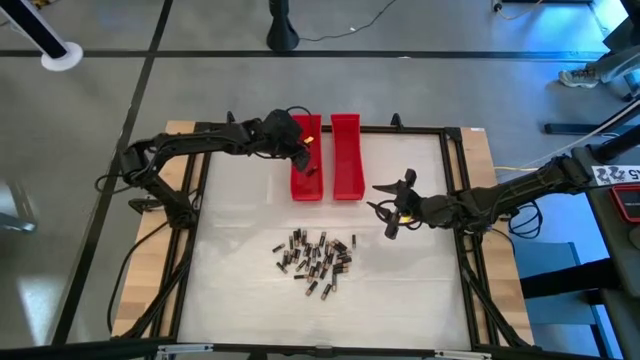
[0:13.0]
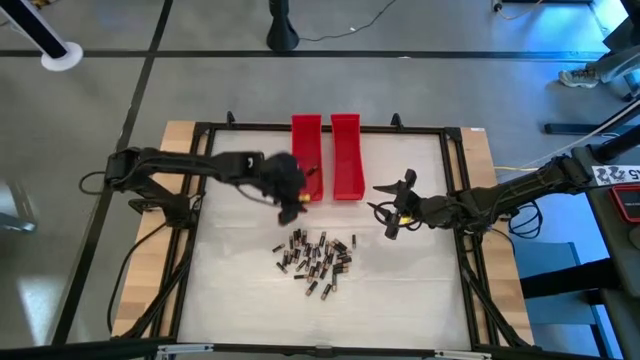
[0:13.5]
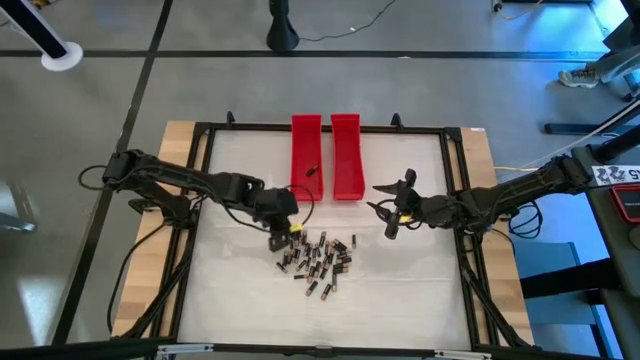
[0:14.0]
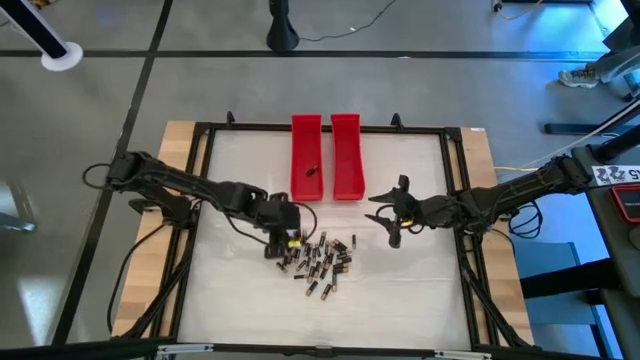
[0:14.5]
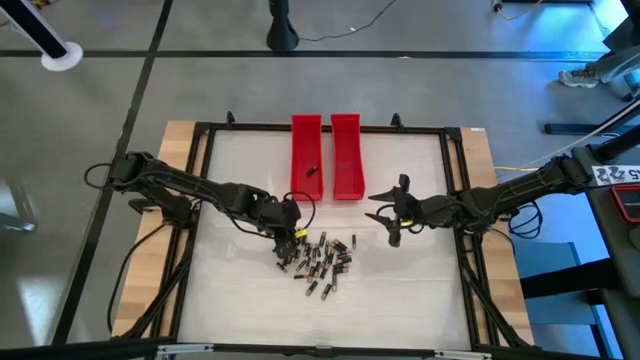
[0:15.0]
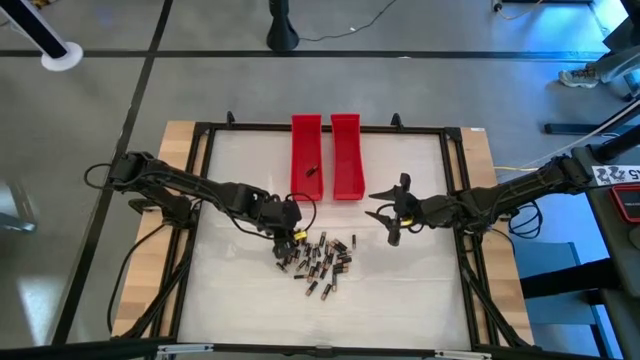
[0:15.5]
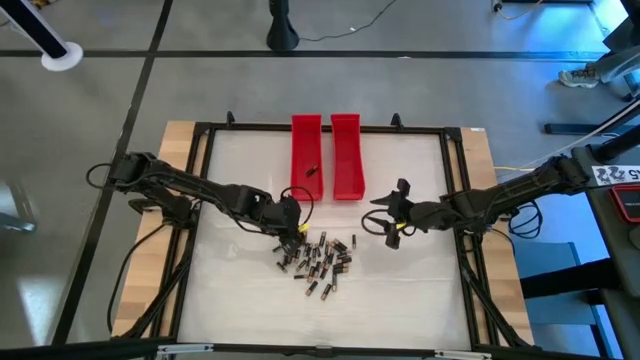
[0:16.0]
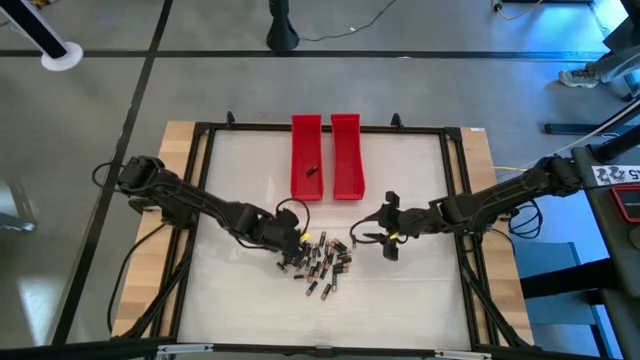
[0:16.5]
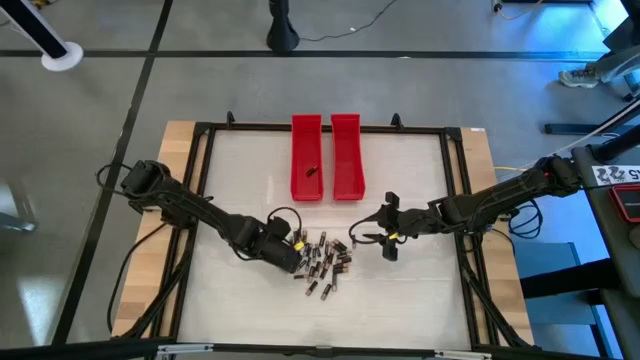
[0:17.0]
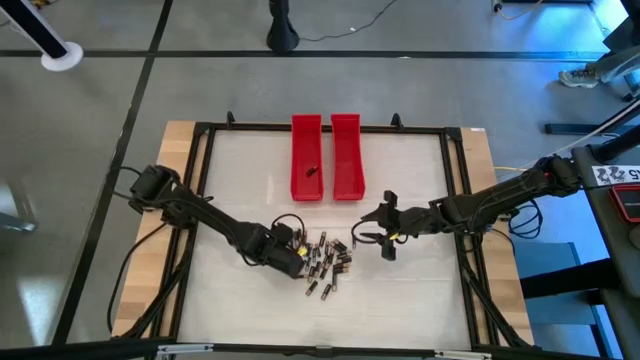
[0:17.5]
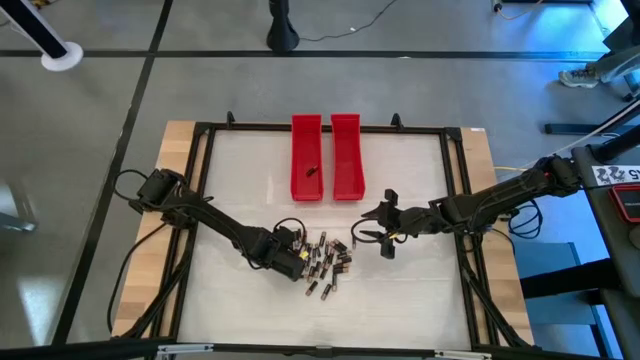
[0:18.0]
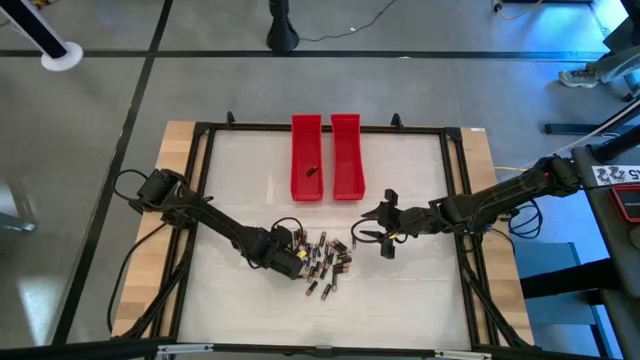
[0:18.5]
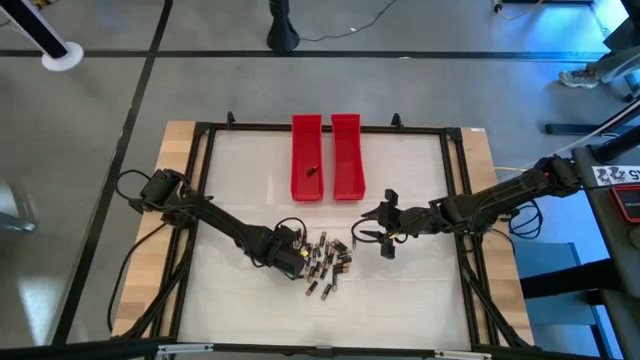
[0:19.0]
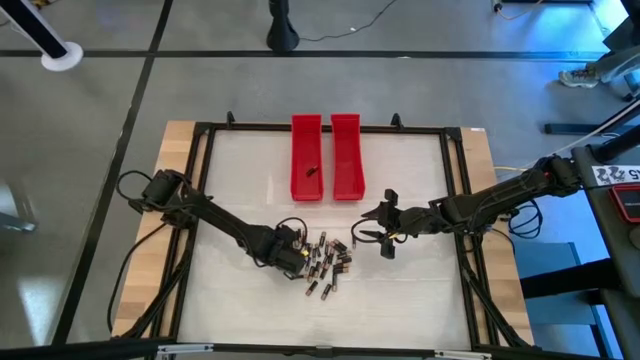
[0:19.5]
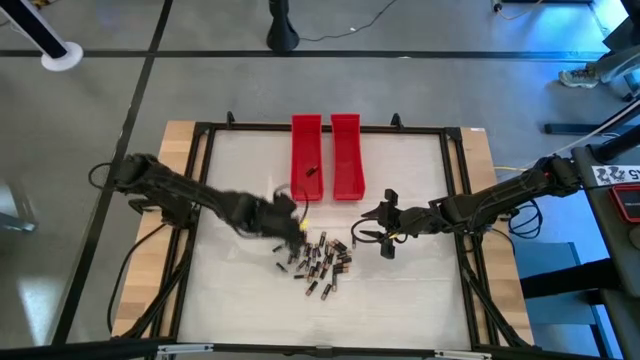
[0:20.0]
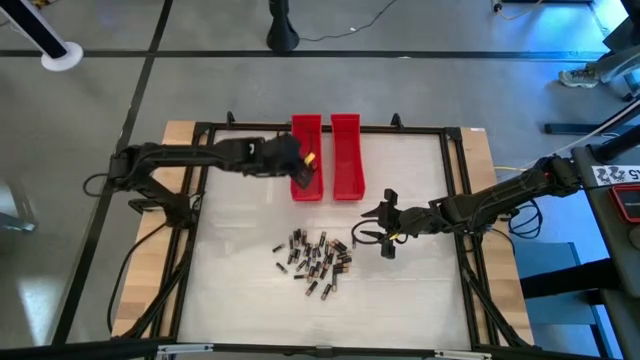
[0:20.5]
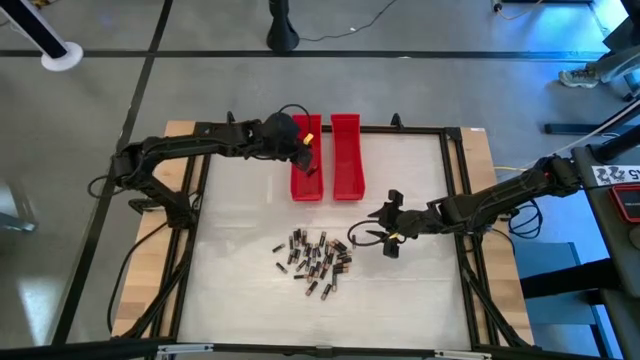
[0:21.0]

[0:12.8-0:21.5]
Task: Sort batteries
Put the large black battery into the left red bin

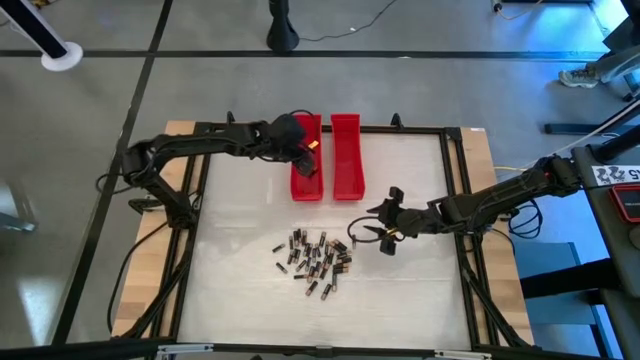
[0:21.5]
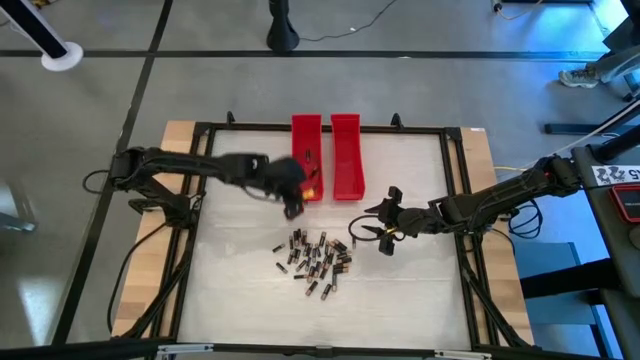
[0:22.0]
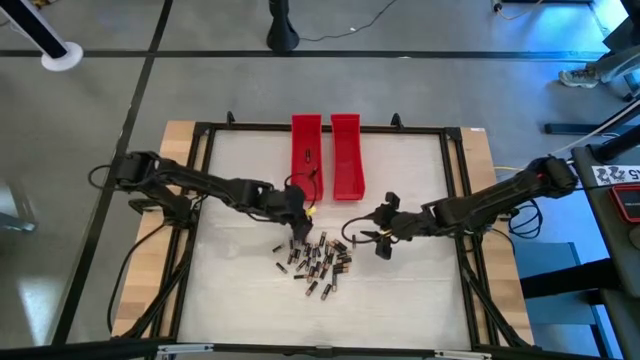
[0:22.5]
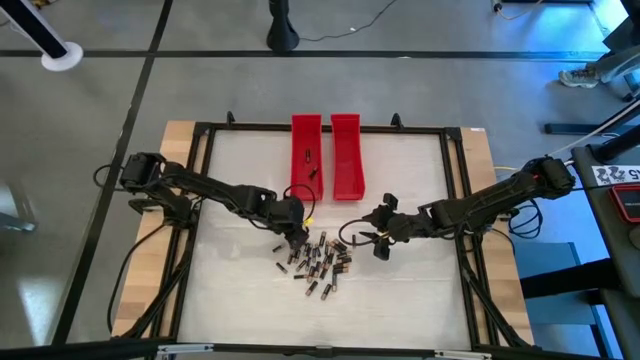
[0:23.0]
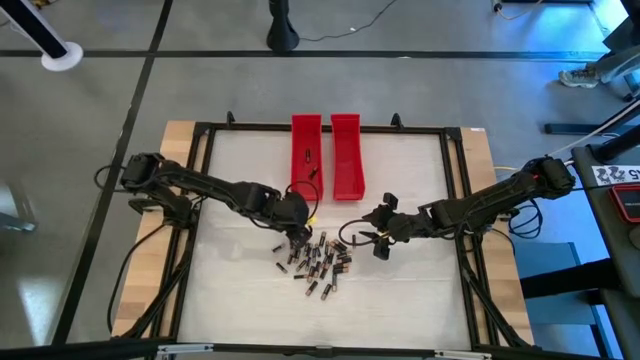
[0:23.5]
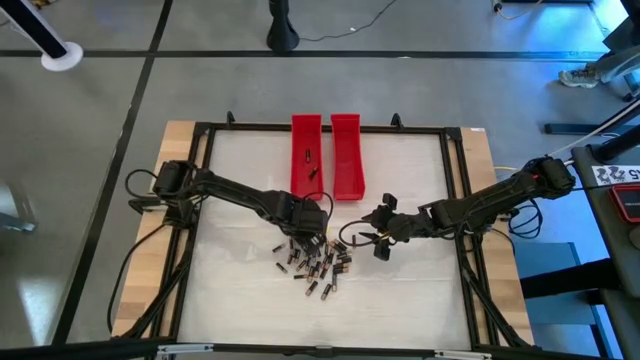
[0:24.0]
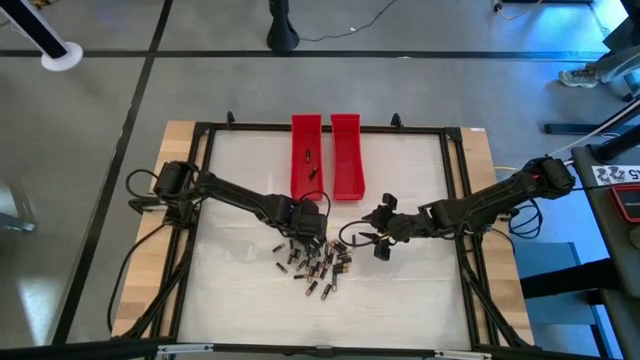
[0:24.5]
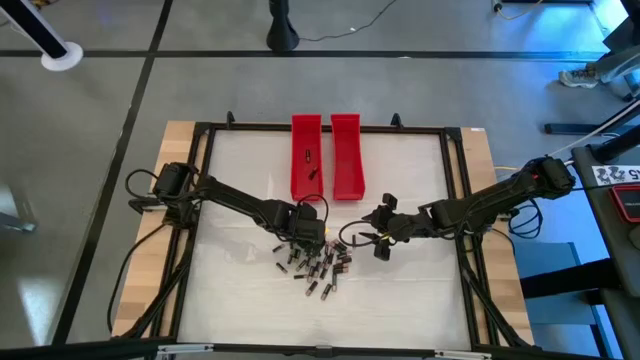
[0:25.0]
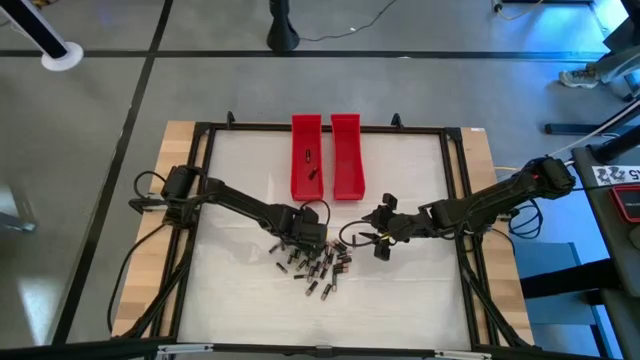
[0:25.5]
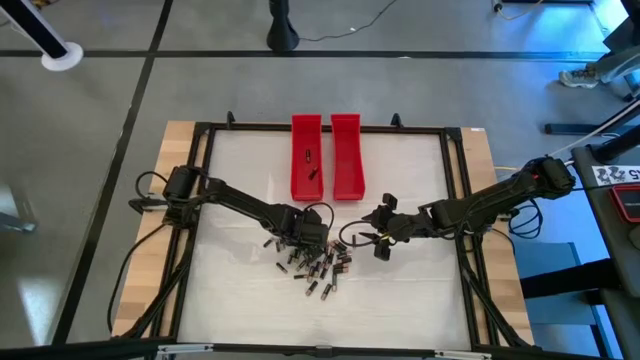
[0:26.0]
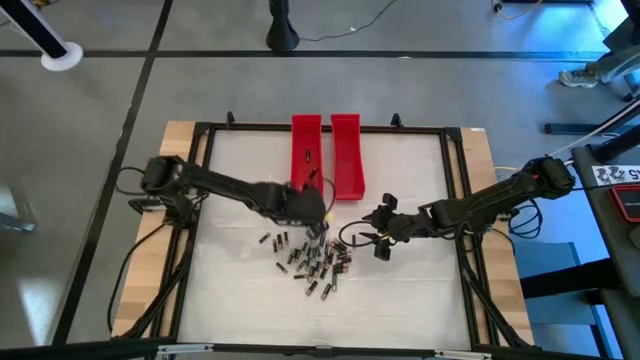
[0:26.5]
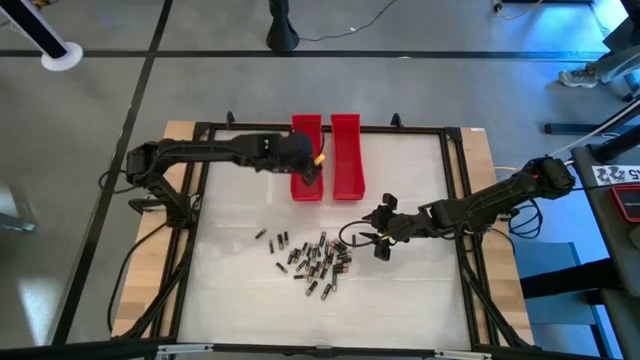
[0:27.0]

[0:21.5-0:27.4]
Put the large black battery into the left red bin

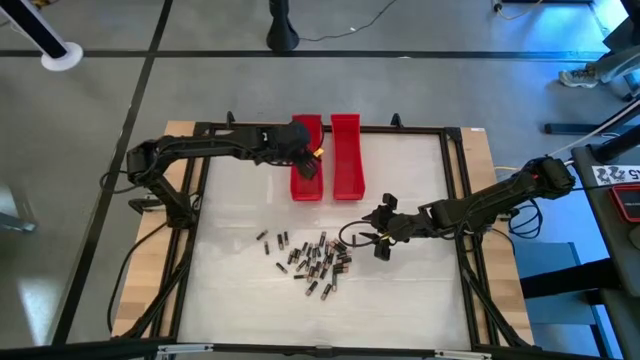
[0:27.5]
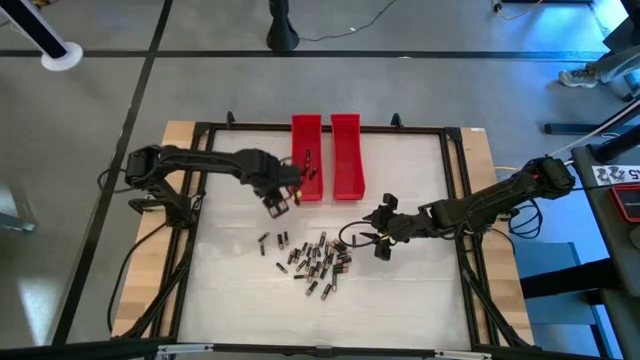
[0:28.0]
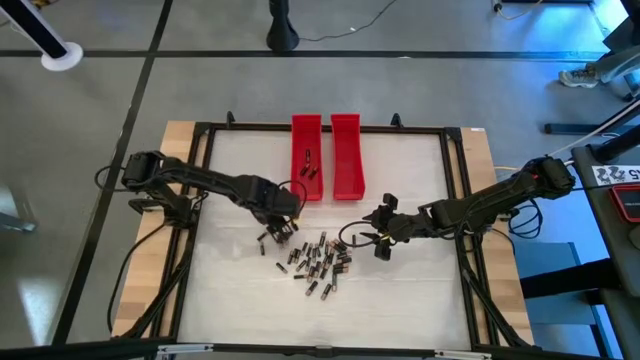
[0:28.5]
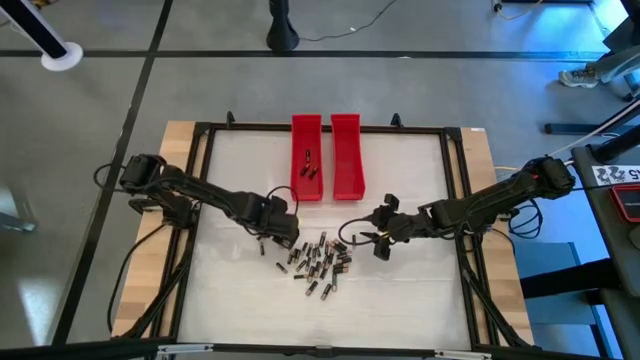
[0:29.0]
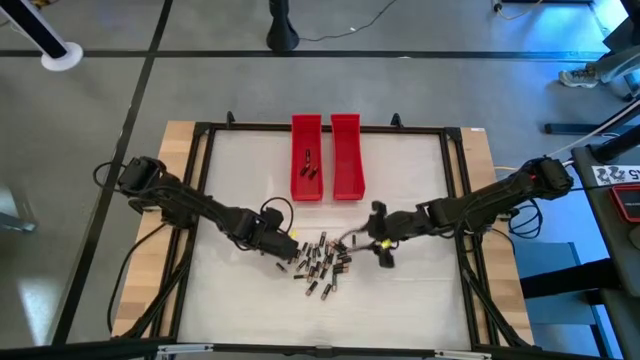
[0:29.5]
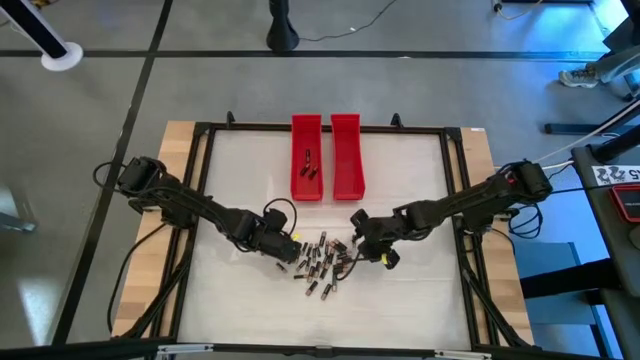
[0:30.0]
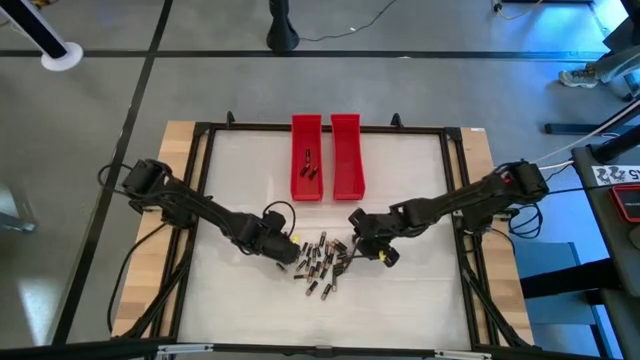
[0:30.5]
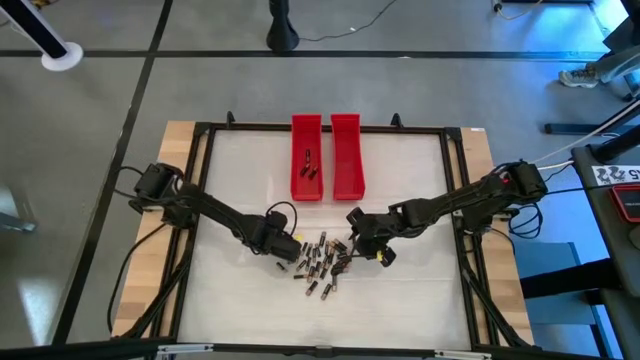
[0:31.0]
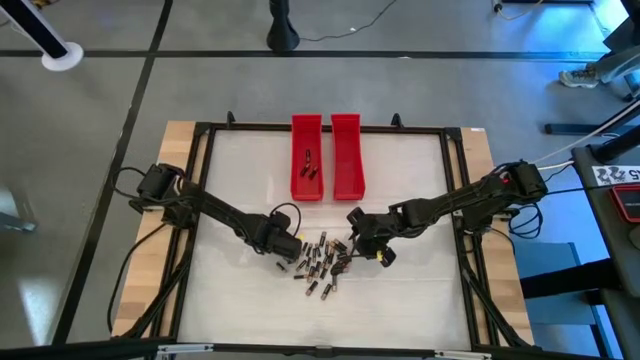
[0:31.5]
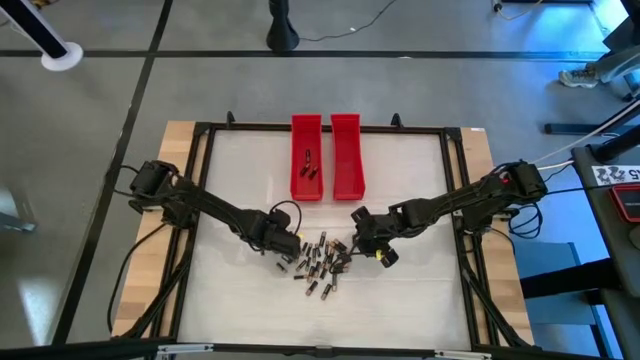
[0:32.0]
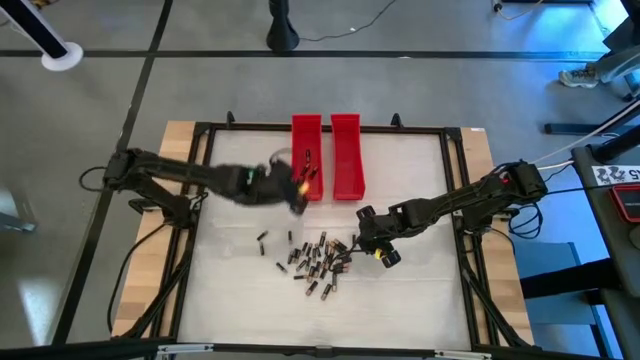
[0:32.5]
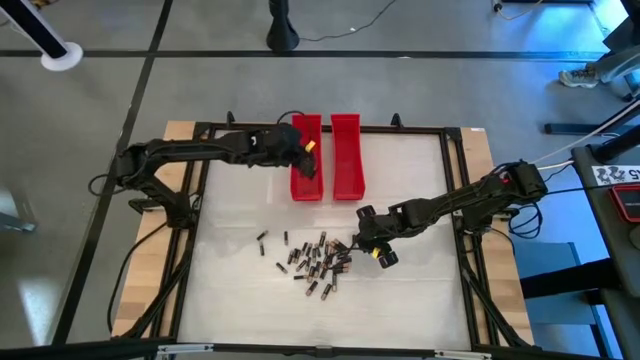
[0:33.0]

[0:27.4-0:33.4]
Put the large black battery into the left red bin

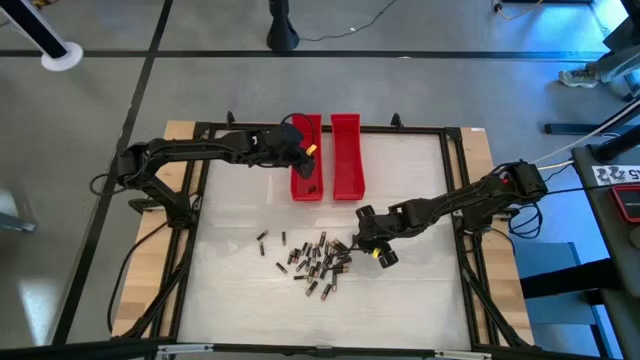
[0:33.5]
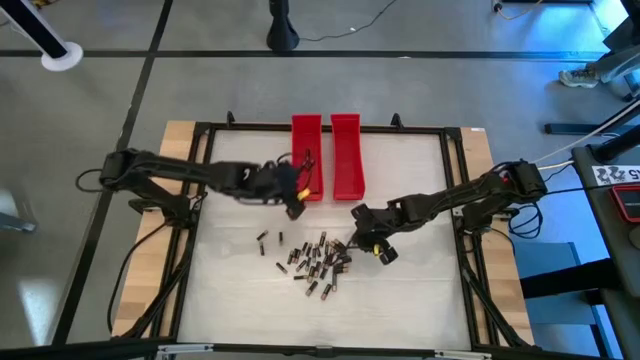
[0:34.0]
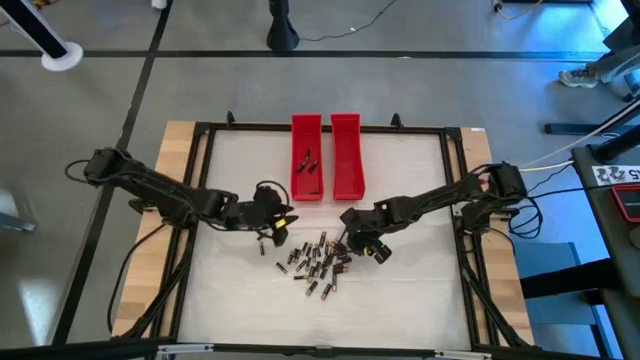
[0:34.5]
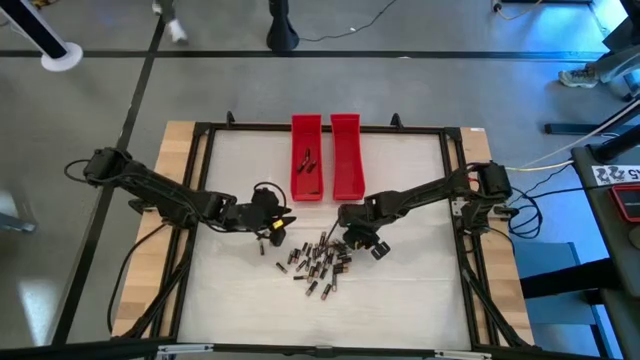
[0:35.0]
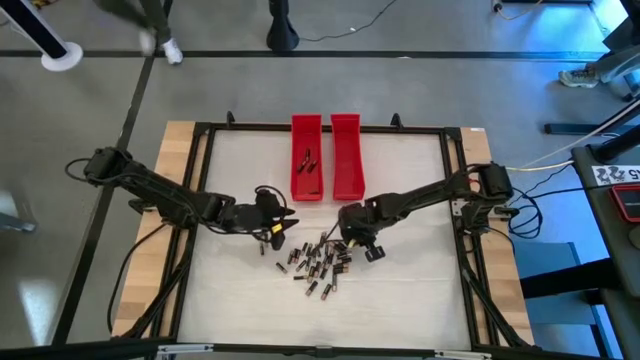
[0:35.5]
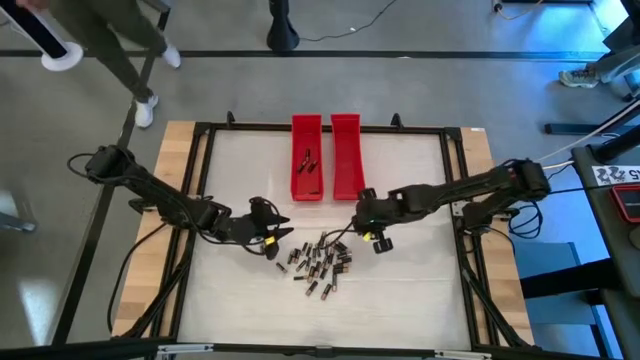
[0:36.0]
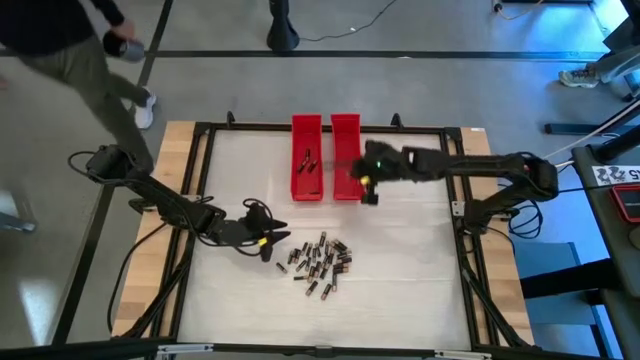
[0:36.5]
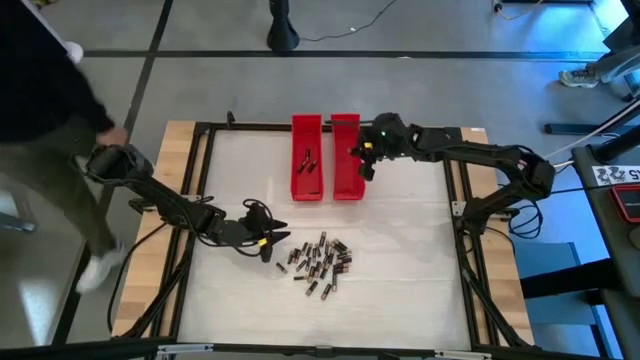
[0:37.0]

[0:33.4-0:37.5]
Put the small black battery into the right red bin
